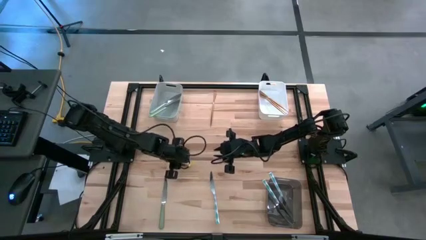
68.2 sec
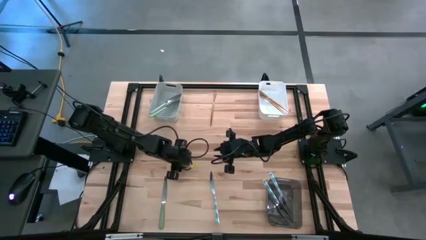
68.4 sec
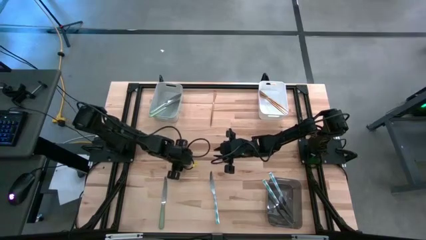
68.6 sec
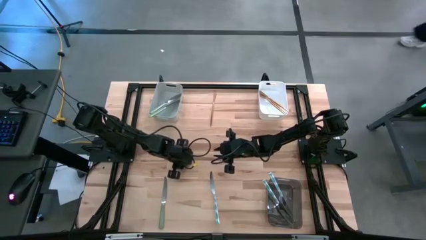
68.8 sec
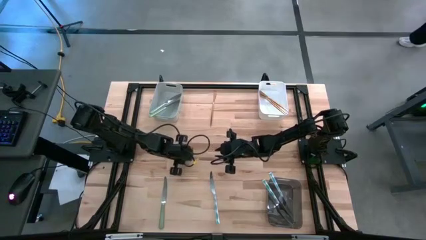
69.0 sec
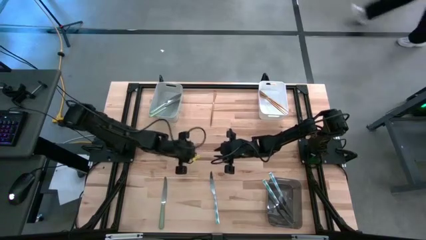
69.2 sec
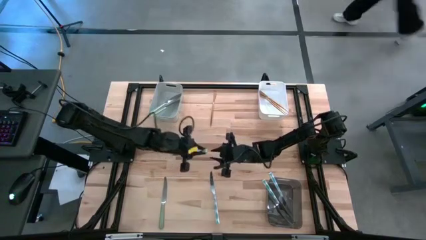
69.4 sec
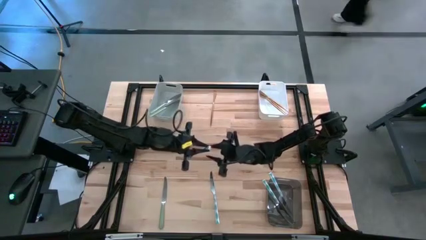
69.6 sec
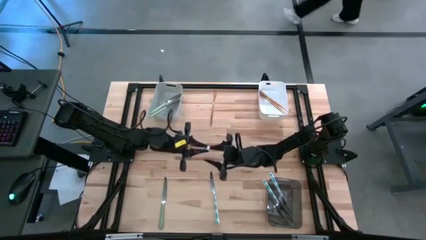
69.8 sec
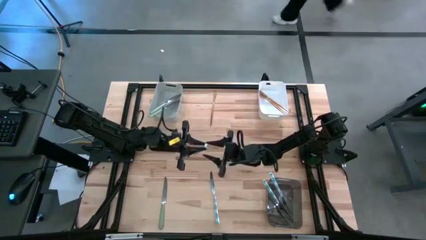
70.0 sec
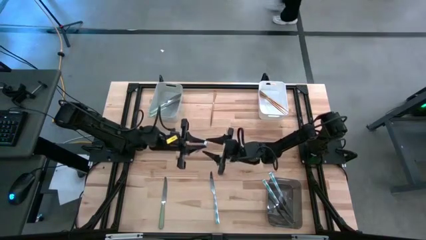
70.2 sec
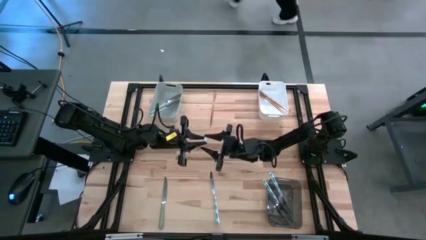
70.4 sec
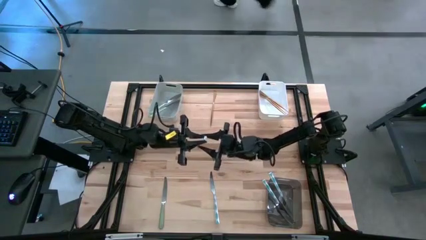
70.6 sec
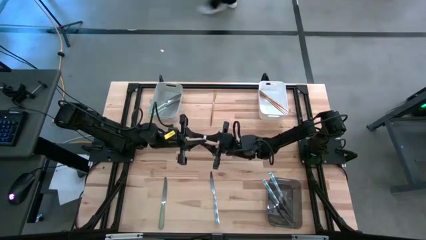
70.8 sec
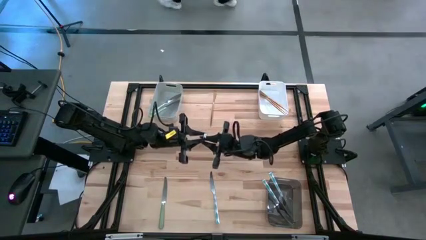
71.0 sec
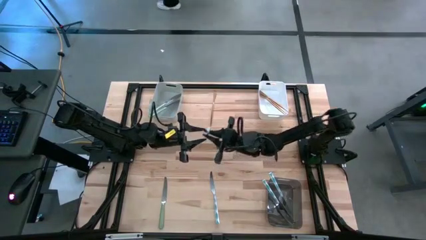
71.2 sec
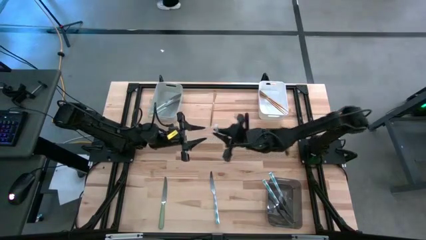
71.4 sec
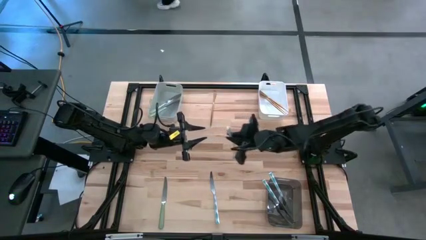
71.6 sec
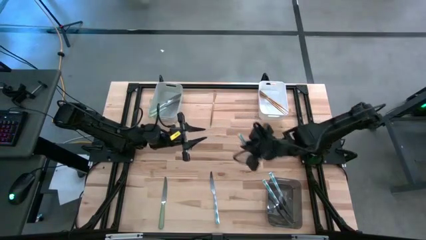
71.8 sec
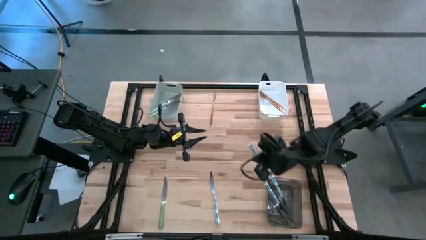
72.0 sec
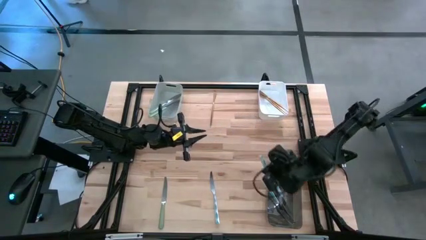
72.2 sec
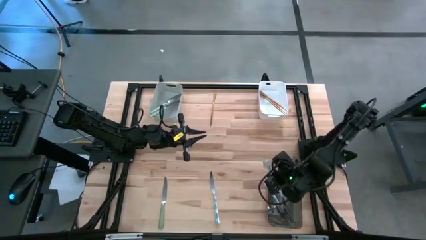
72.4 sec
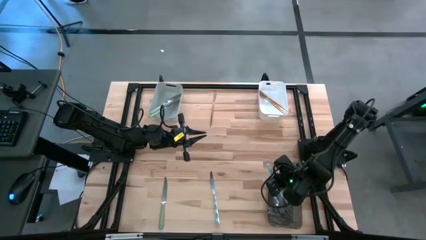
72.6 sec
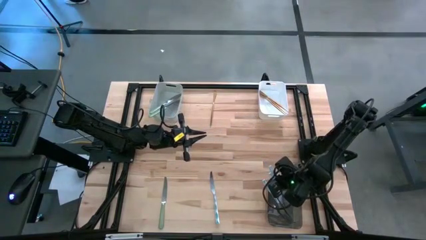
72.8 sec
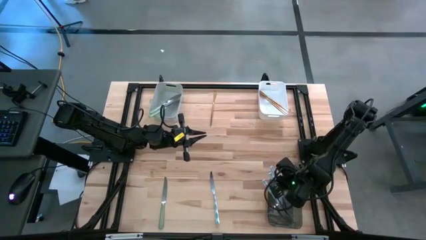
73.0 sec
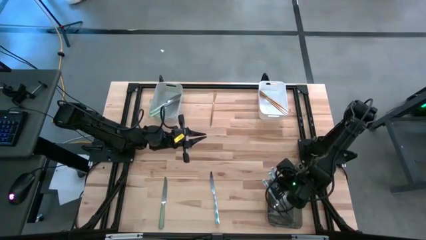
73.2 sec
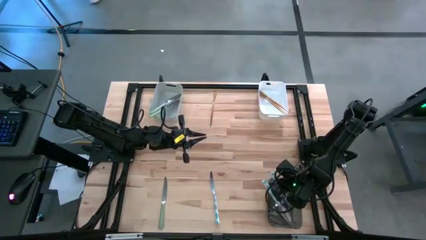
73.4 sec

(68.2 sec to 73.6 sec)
Task: Sort silverware by color (type)
Put the left blue knife into the black bin

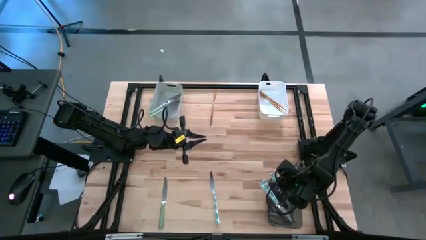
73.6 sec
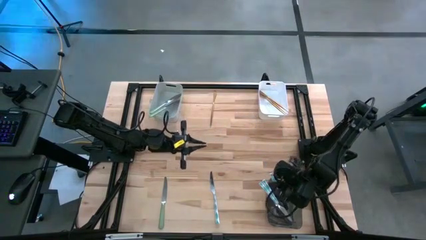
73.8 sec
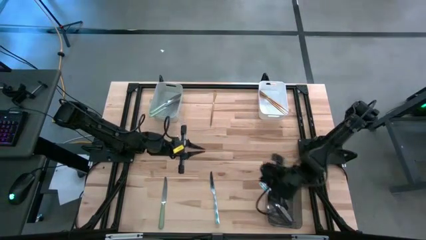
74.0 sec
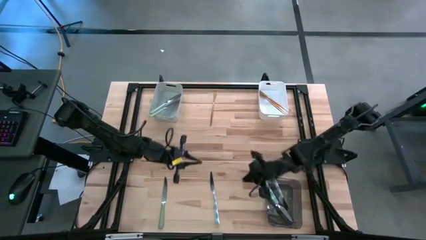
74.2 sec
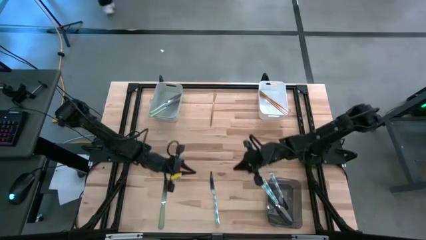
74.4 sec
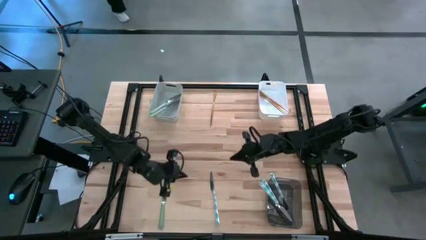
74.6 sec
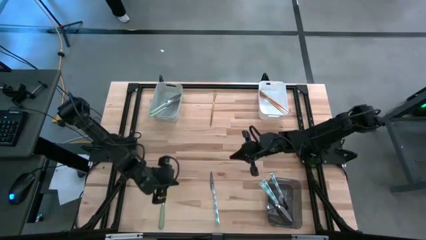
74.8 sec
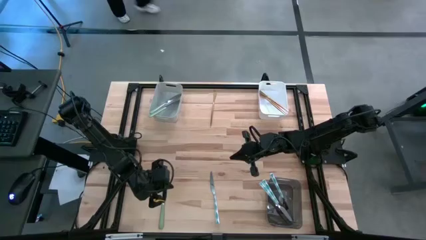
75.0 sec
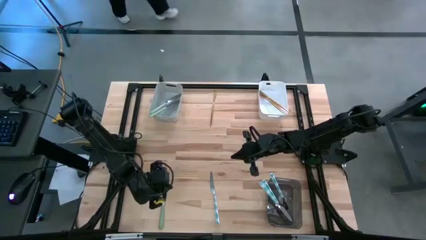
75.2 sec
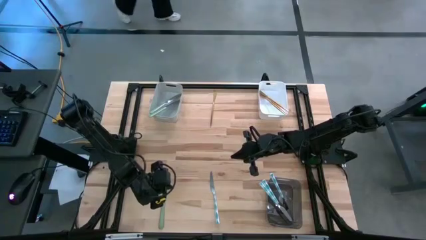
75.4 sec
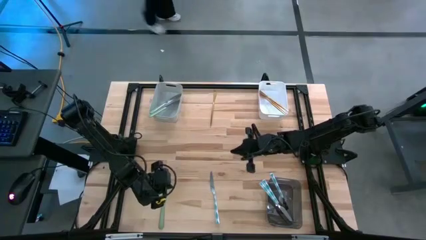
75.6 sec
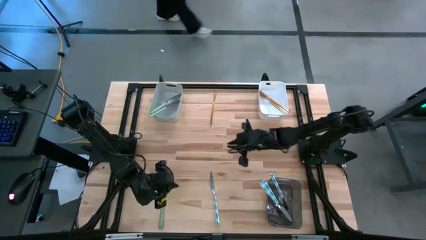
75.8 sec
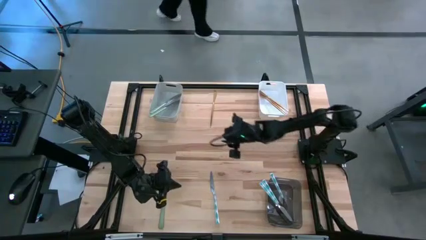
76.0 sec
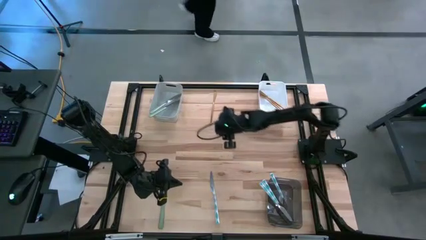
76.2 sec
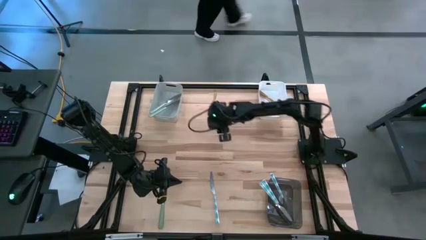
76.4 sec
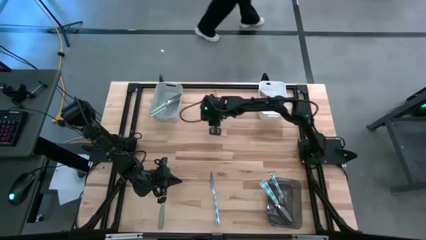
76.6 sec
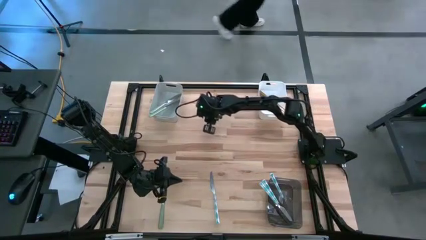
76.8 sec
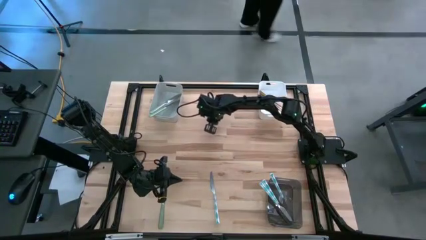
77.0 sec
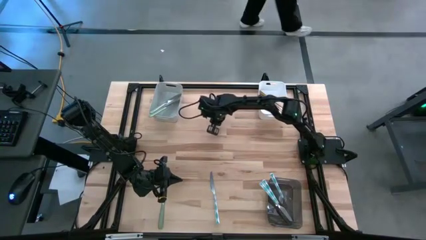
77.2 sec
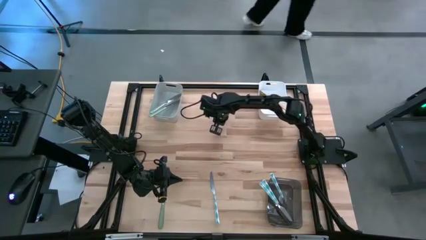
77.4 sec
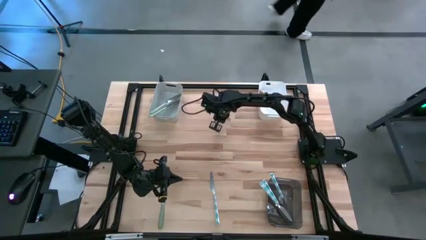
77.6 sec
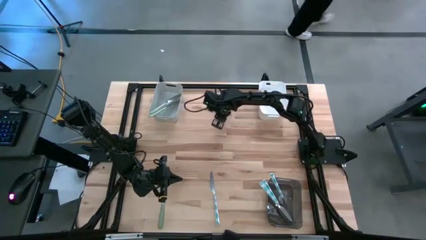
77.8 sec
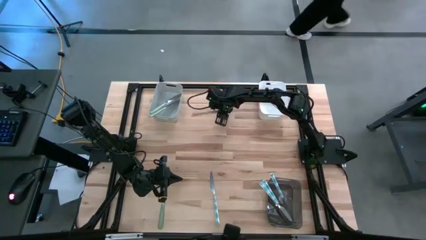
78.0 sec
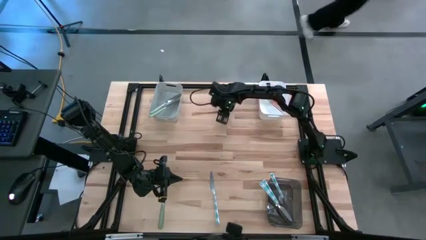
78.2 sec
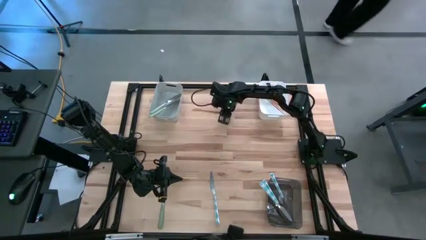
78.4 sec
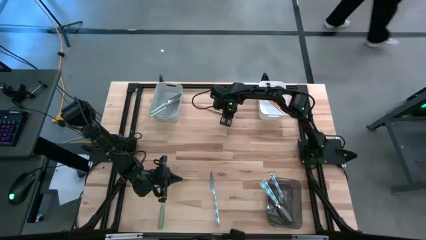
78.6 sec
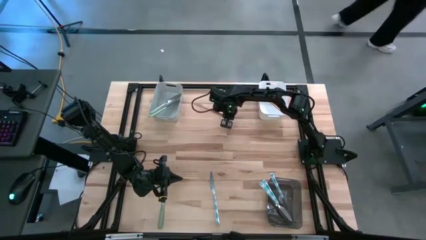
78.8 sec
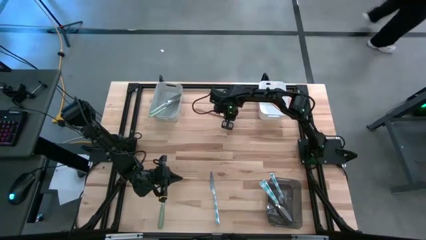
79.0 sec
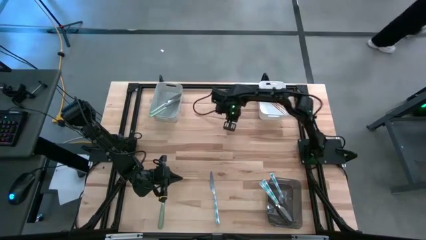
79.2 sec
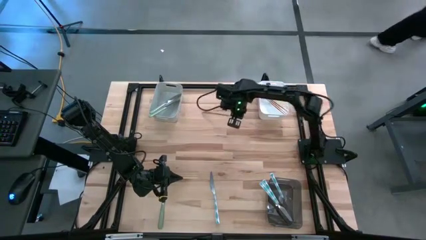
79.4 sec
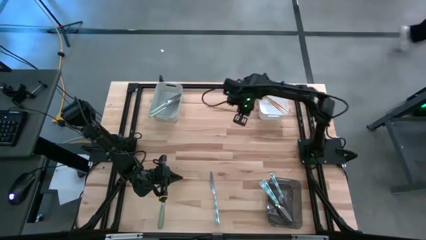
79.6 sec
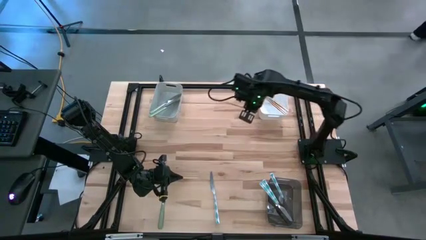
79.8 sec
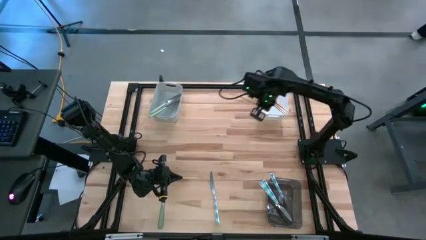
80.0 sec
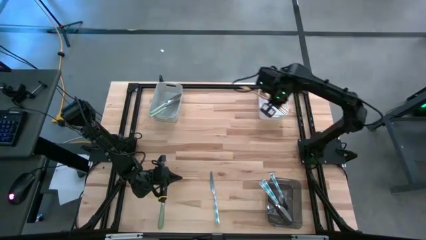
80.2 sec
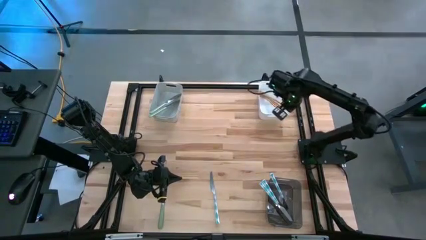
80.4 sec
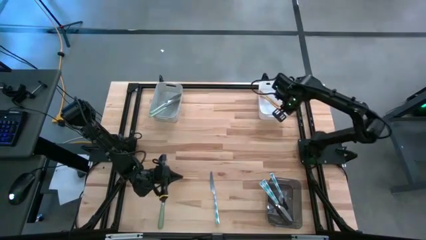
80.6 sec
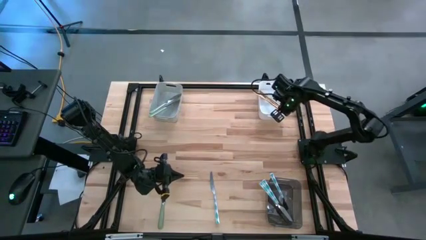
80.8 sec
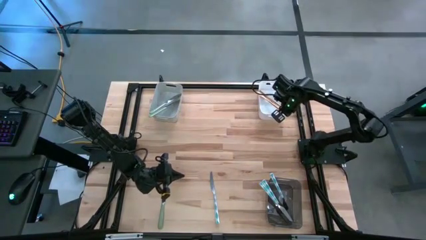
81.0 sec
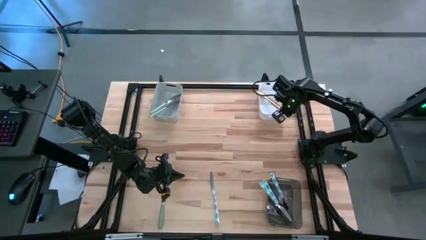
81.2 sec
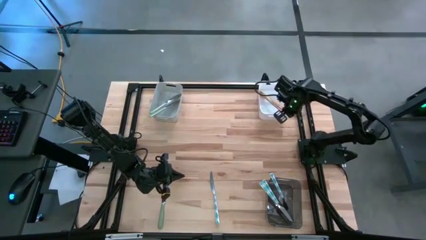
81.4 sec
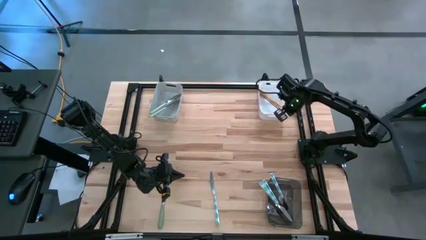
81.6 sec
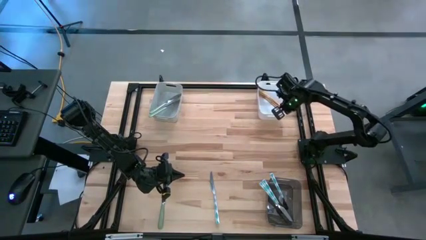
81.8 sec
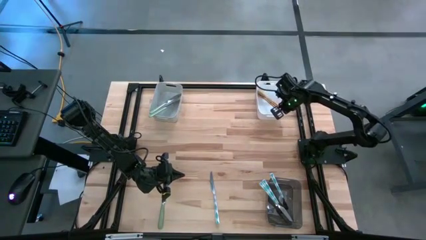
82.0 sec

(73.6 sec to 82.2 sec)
Put the golden knife into the white bin
